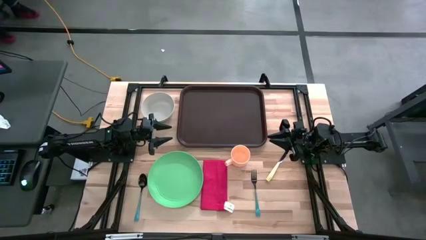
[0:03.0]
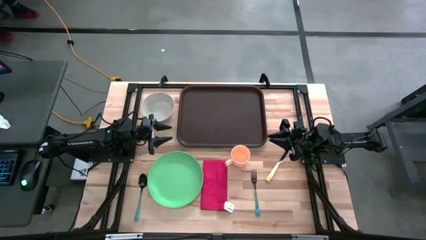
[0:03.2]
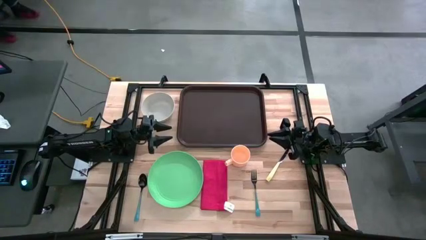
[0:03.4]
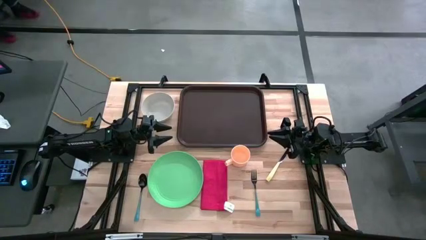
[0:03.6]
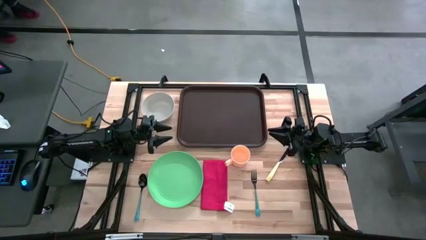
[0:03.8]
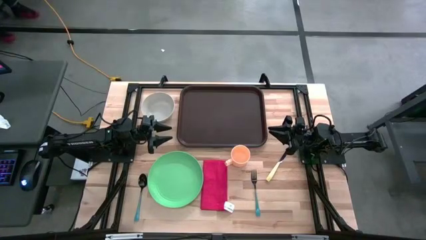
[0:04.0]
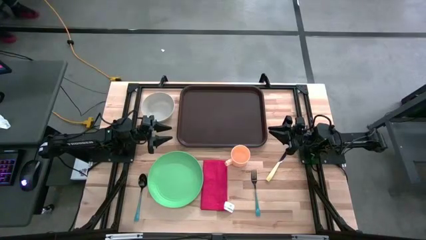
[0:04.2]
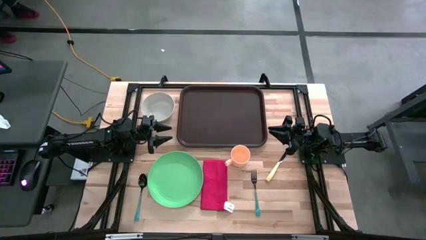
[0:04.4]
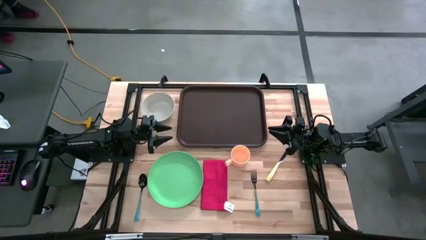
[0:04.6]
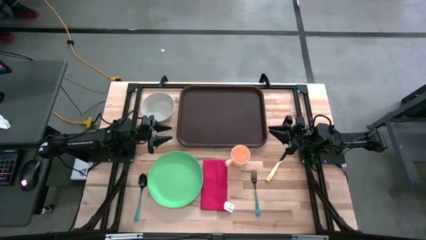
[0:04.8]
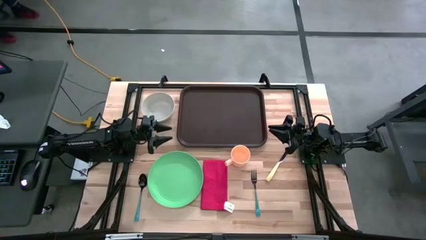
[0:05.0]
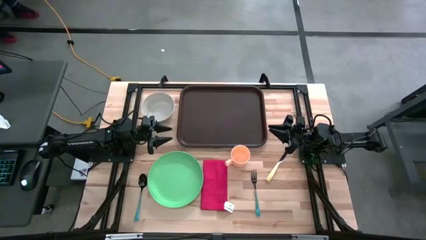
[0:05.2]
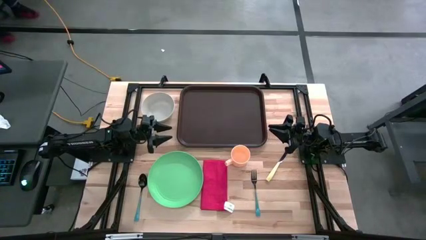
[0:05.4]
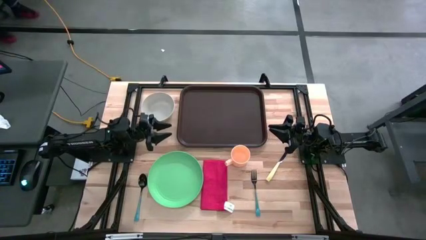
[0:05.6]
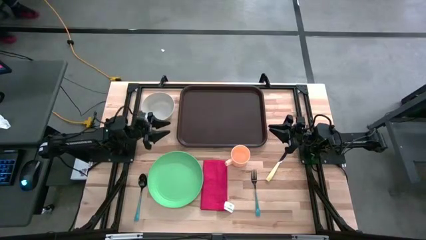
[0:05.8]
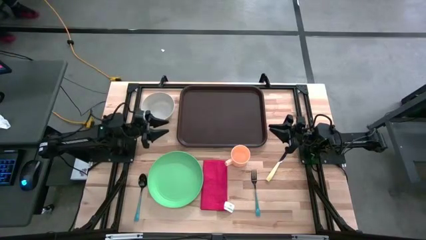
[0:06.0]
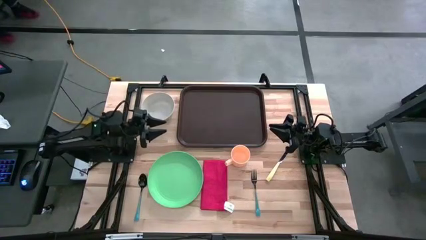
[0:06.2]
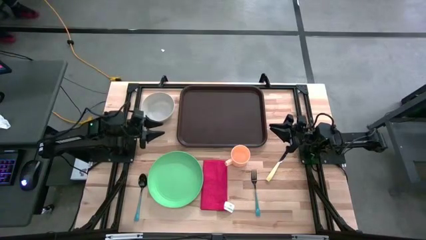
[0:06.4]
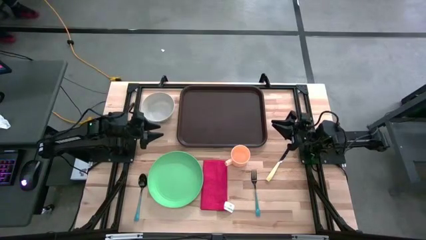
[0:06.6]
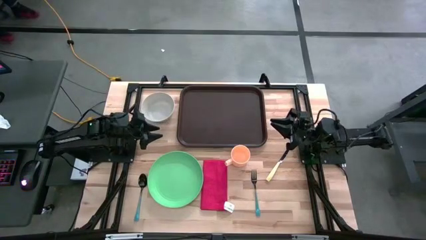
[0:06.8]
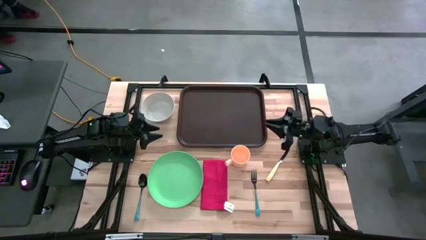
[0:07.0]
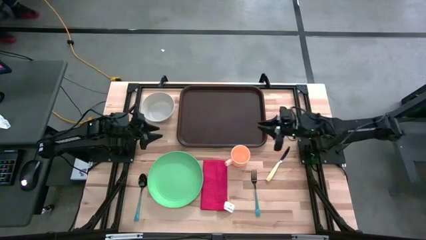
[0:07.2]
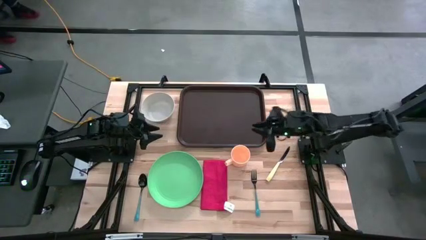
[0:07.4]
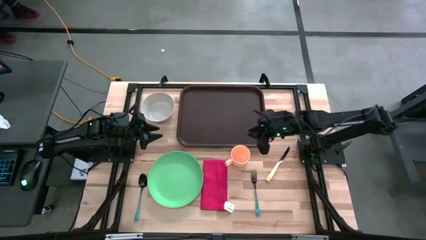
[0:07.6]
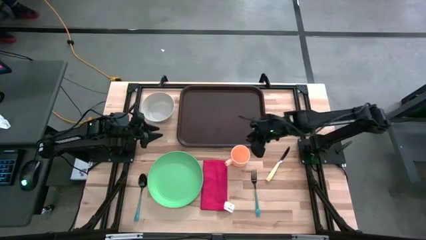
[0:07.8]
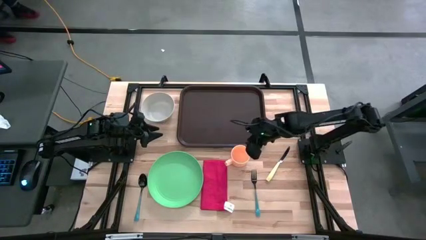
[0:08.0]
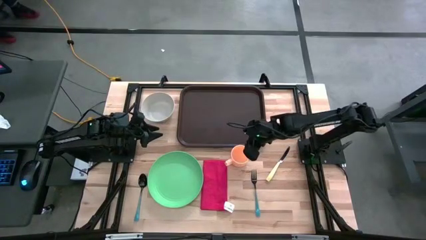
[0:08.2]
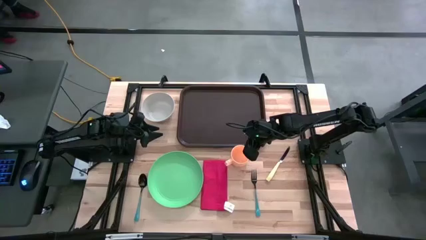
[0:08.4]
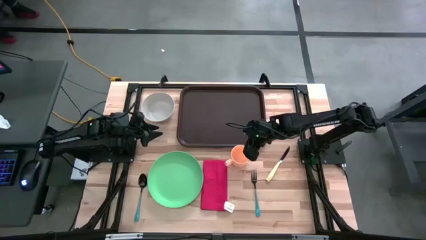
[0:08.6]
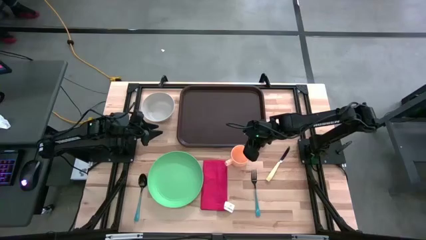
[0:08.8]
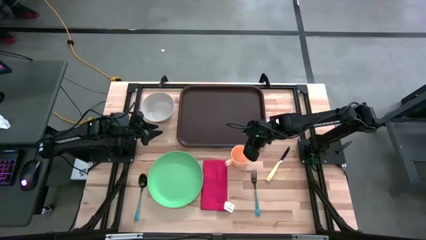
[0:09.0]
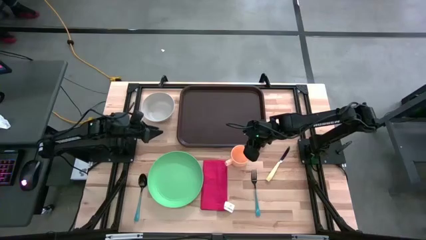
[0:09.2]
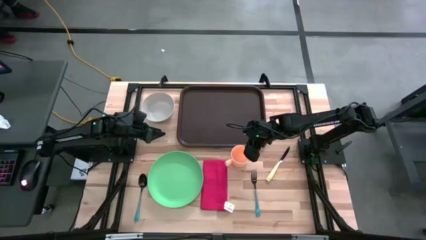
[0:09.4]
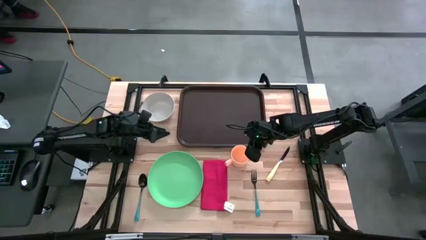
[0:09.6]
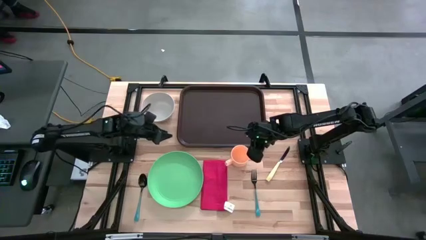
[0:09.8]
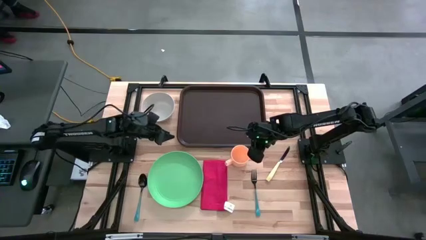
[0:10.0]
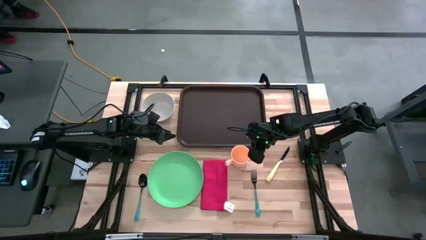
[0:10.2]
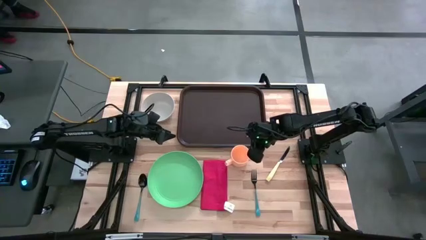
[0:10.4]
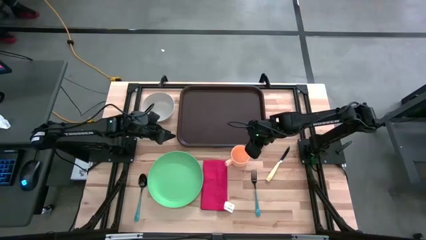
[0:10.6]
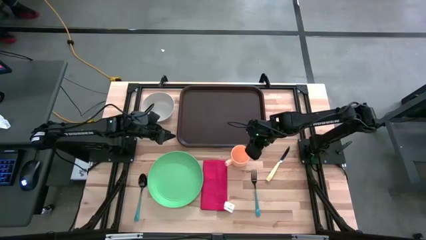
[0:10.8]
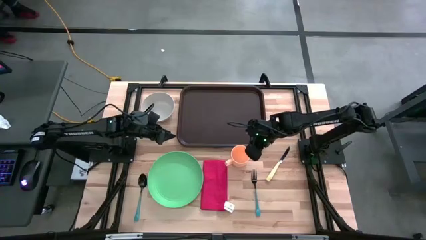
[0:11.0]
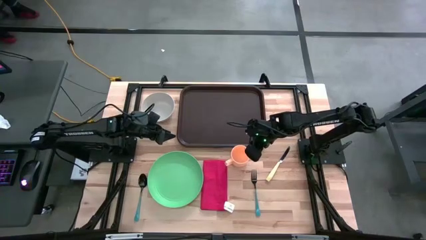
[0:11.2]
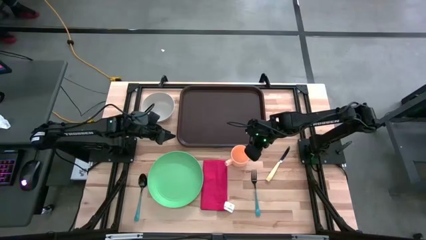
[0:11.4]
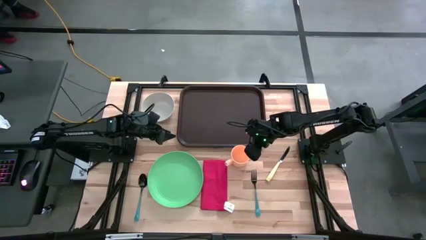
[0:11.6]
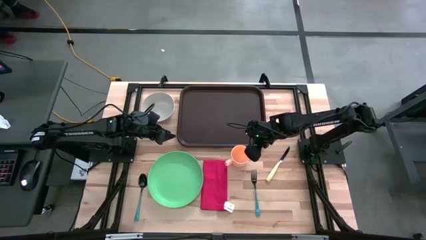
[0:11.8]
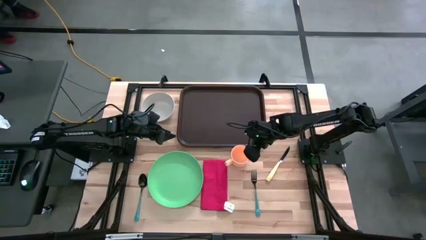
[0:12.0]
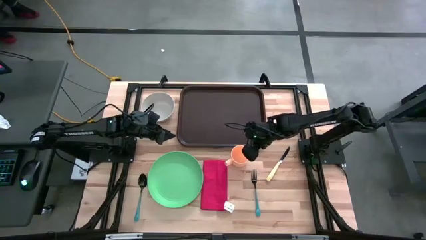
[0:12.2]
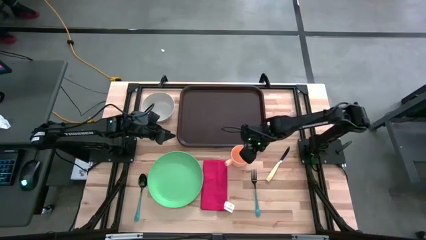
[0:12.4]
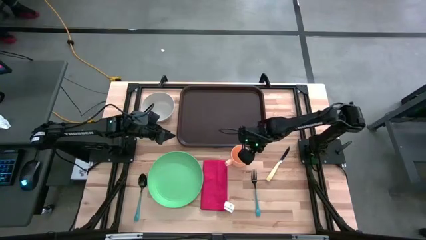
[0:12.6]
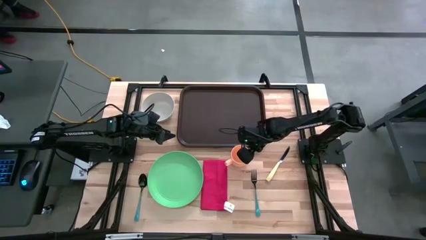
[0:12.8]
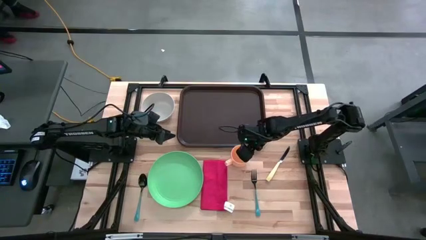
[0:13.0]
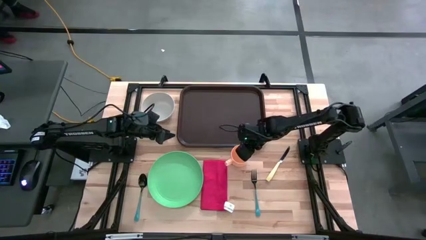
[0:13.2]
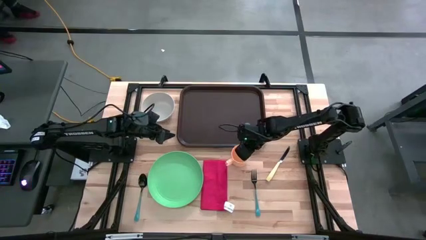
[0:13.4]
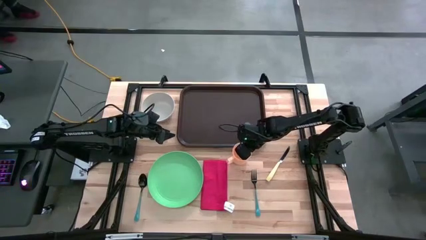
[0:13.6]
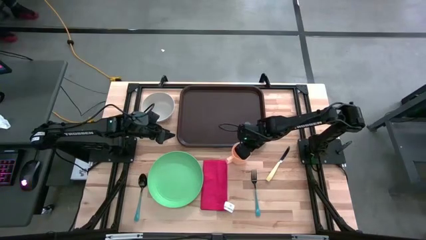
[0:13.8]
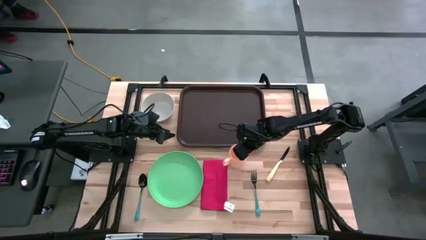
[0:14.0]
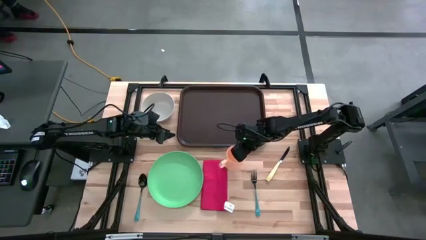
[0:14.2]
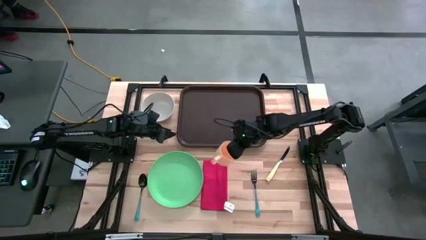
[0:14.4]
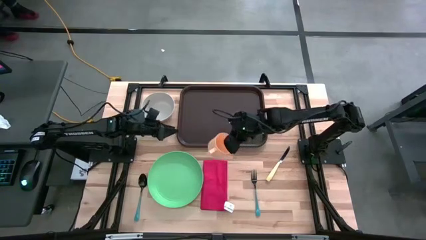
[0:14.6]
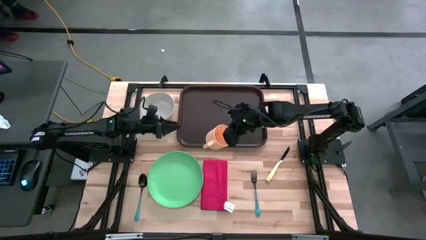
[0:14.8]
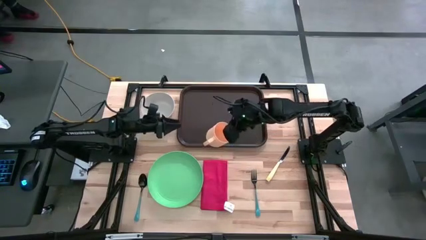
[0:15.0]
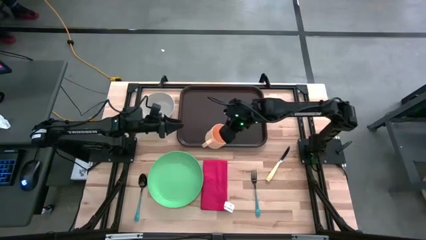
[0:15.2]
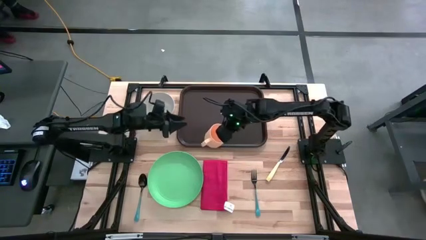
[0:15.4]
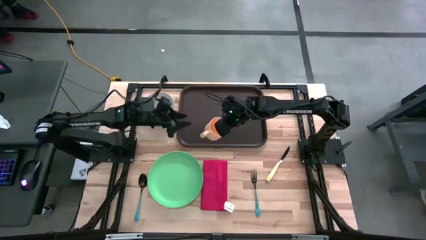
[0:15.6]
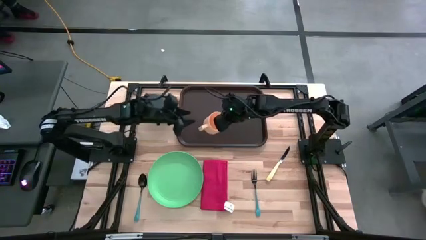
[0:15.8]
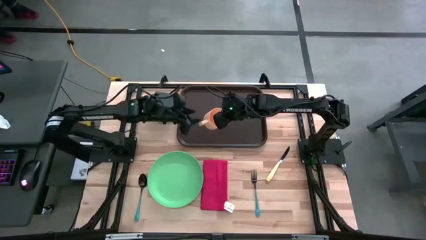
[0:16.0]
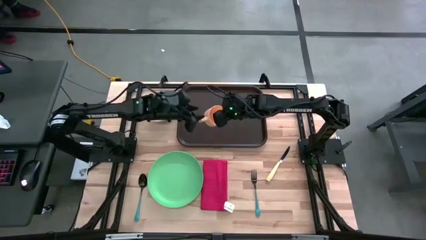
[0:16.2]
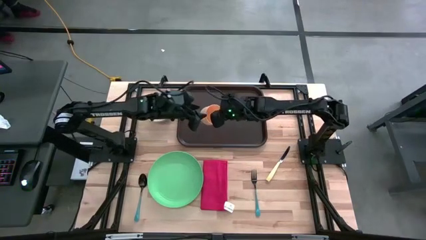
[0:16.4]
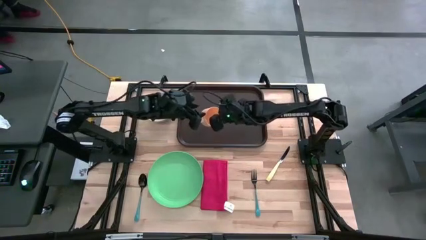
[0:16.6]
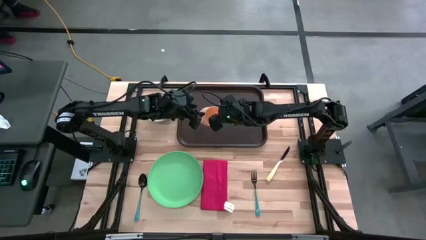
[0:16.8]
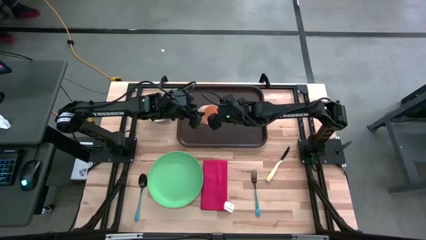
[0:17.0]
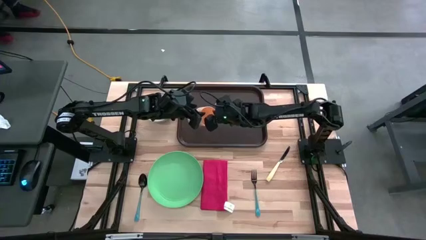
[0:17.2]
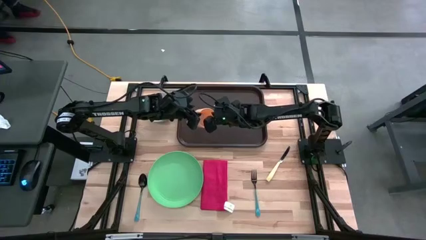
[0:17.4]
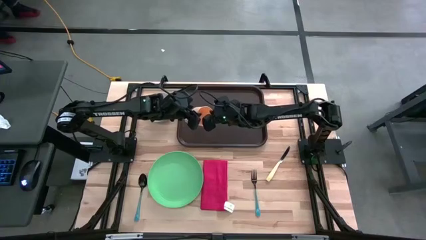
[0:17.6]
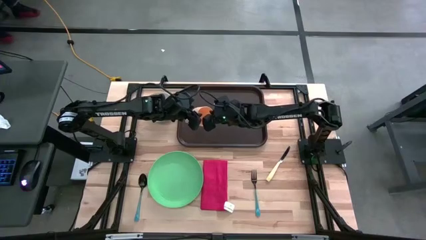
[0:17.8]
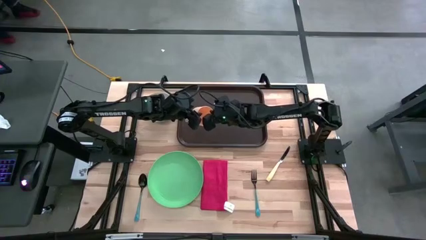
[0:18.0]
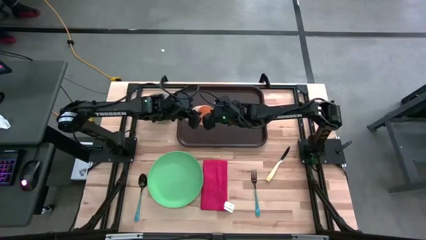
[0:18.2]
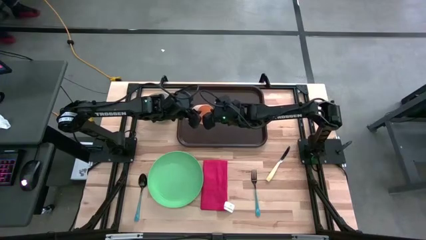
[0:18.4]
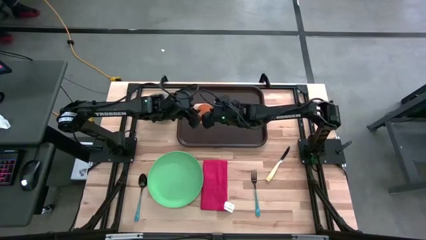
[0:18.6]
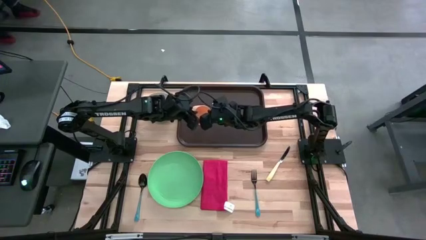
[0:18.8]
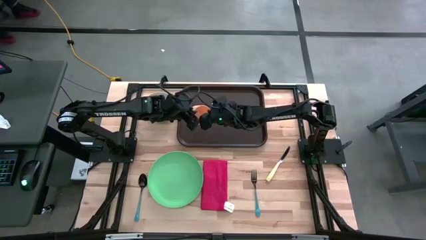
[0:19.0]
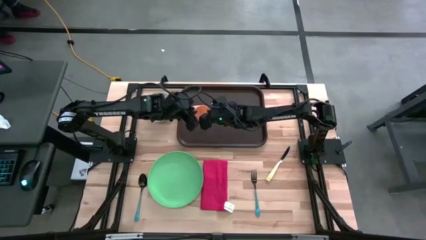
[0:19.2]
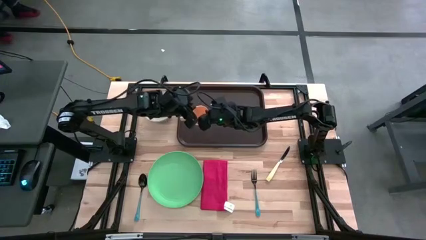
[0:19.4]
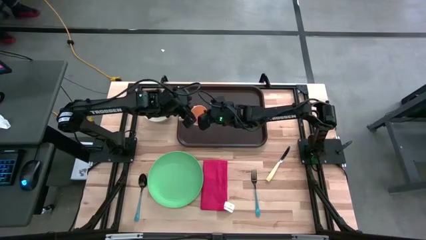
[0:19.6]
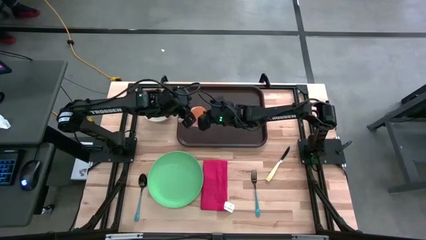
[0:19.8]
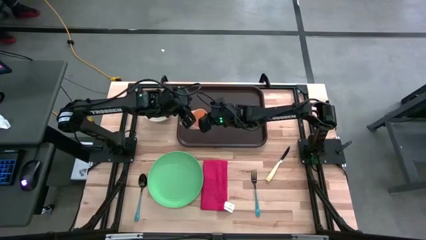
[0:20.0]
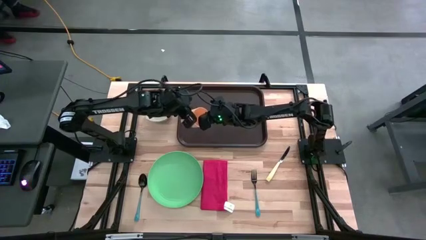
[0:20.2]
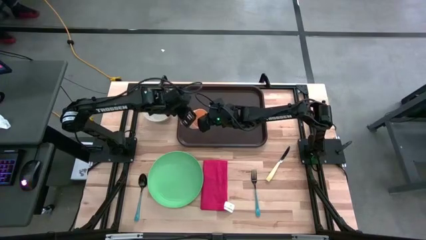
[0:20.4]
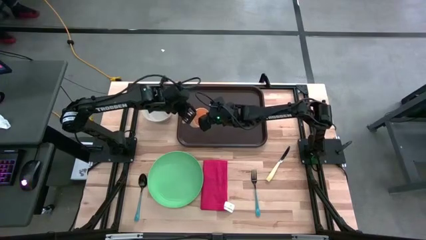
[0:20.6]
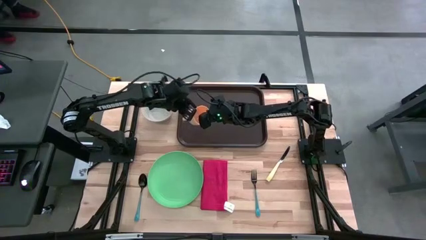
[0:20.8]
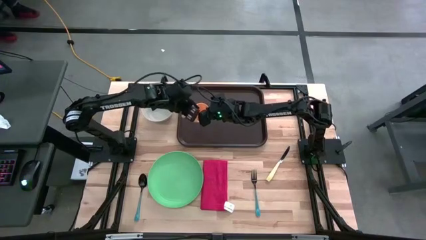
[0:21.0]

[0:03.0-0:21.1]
Task: Set up tray
Put the yellow mug on the brown tray
